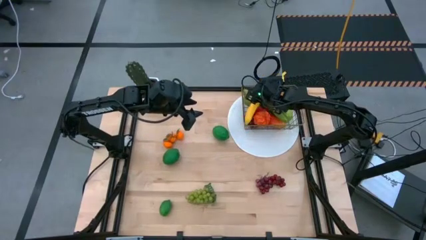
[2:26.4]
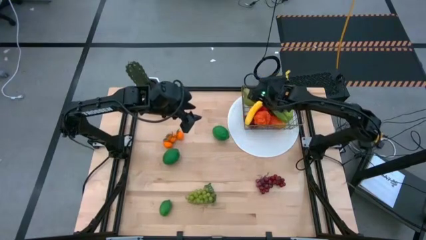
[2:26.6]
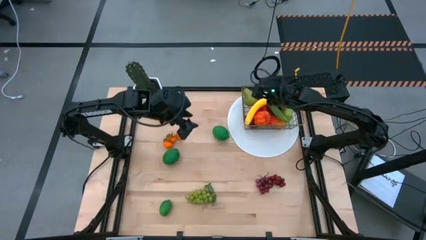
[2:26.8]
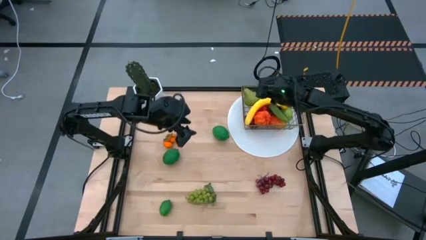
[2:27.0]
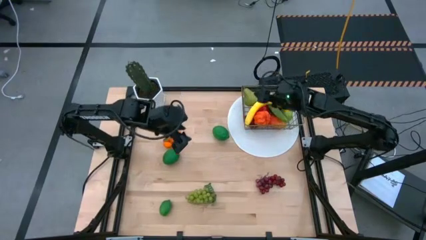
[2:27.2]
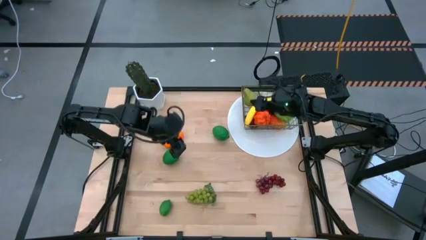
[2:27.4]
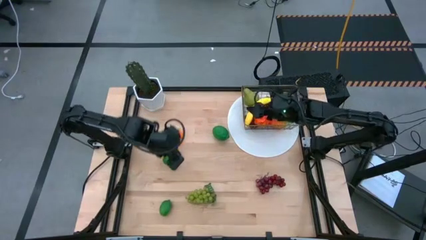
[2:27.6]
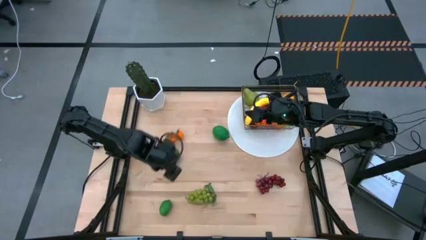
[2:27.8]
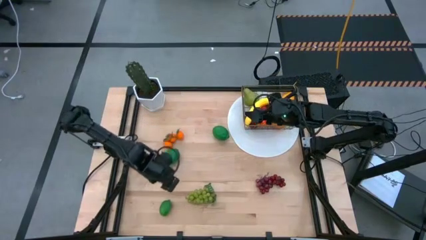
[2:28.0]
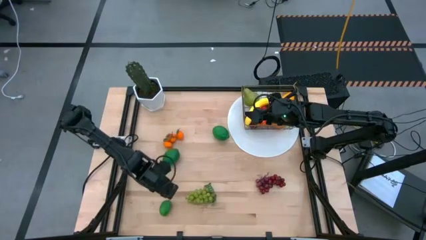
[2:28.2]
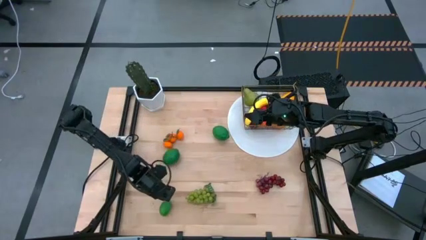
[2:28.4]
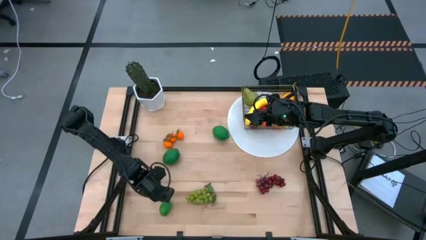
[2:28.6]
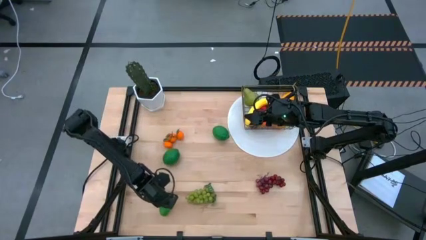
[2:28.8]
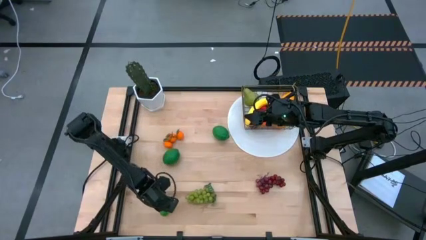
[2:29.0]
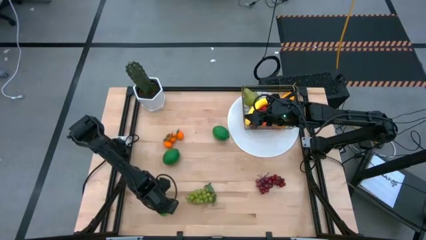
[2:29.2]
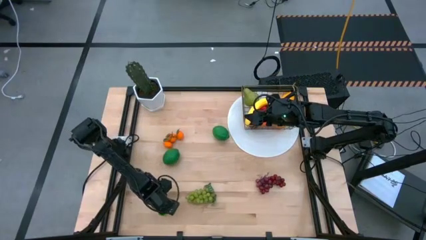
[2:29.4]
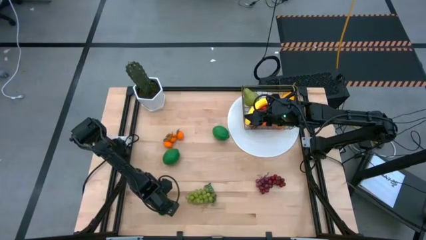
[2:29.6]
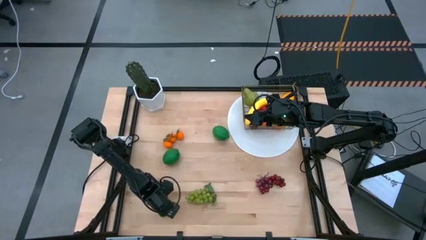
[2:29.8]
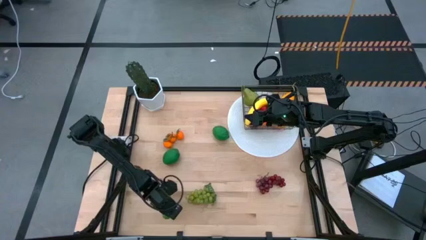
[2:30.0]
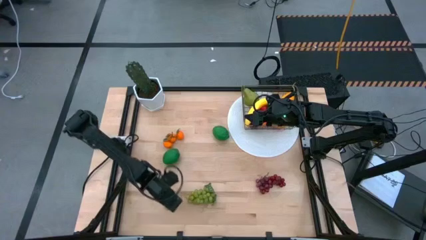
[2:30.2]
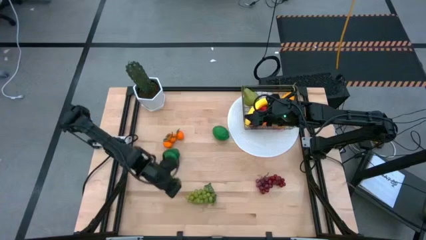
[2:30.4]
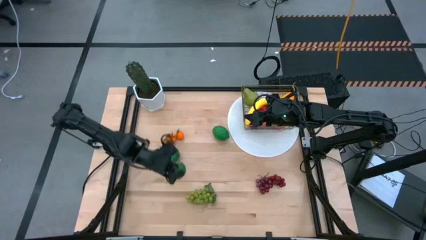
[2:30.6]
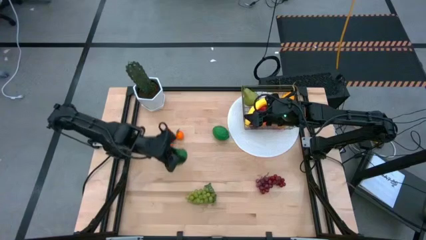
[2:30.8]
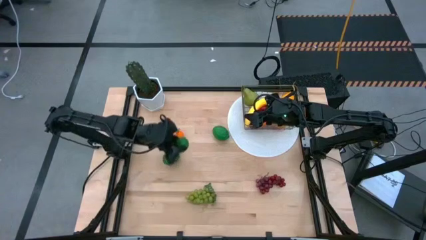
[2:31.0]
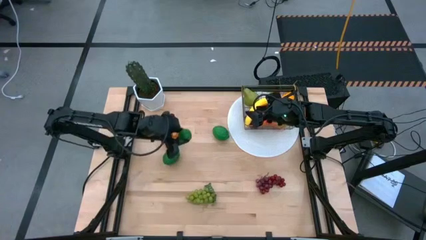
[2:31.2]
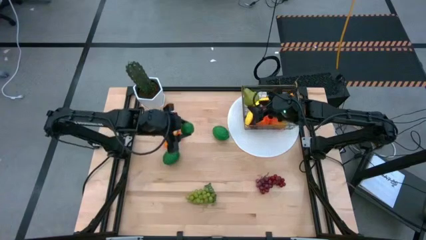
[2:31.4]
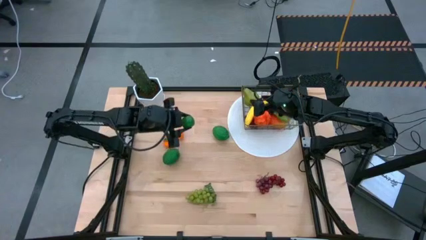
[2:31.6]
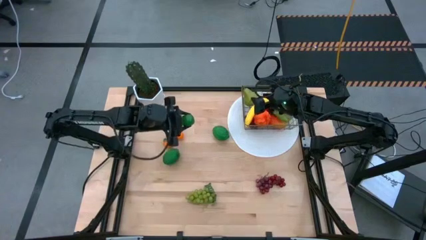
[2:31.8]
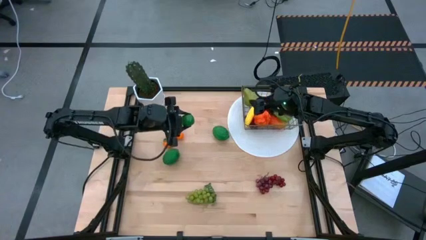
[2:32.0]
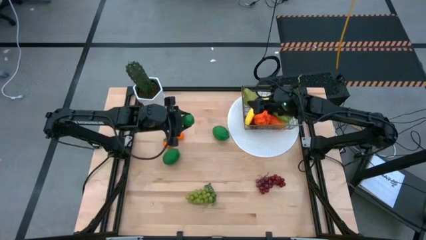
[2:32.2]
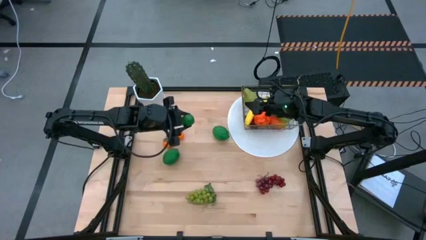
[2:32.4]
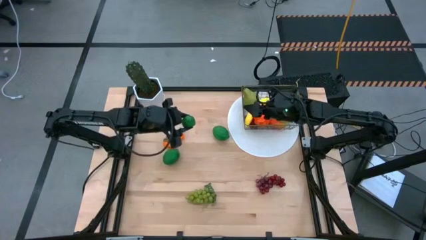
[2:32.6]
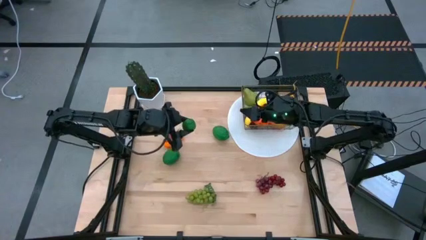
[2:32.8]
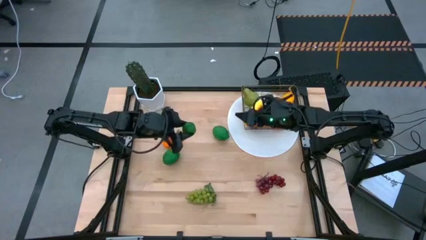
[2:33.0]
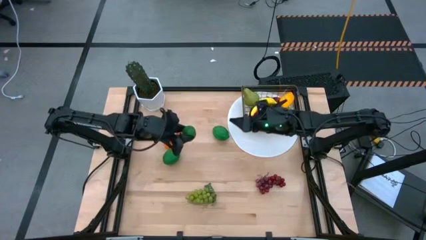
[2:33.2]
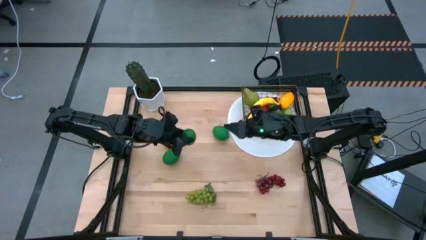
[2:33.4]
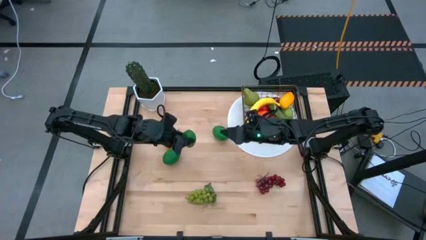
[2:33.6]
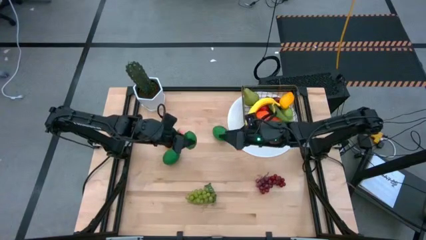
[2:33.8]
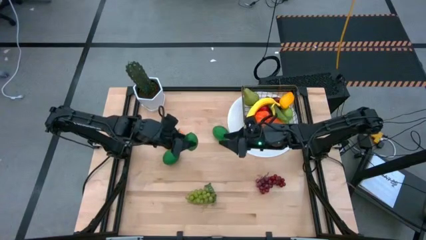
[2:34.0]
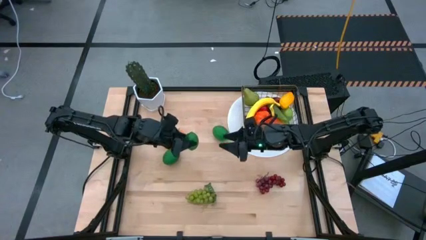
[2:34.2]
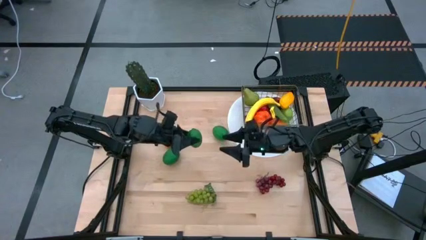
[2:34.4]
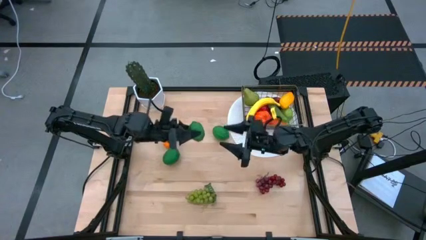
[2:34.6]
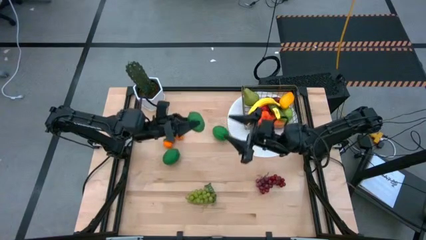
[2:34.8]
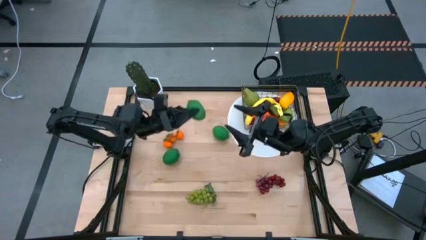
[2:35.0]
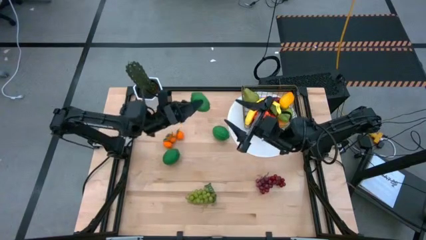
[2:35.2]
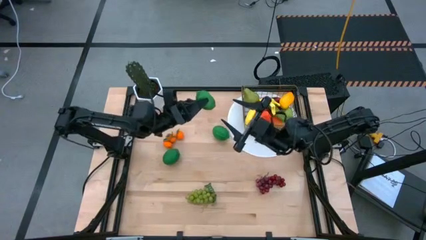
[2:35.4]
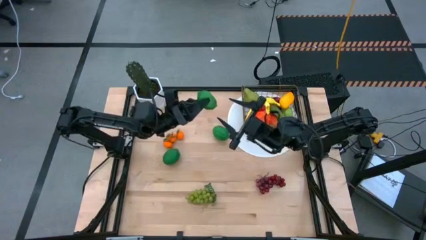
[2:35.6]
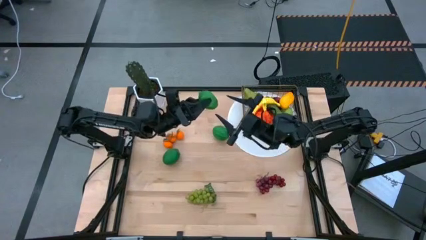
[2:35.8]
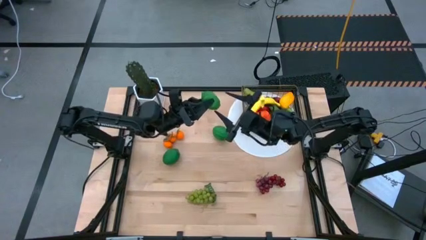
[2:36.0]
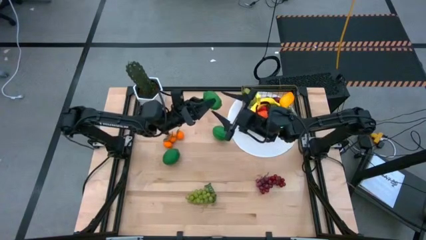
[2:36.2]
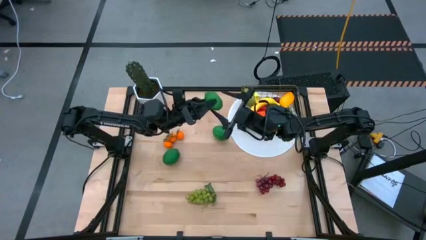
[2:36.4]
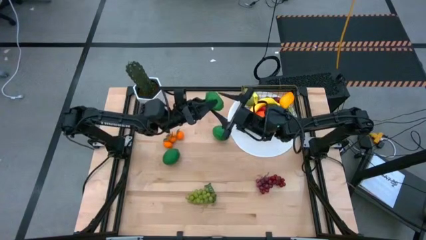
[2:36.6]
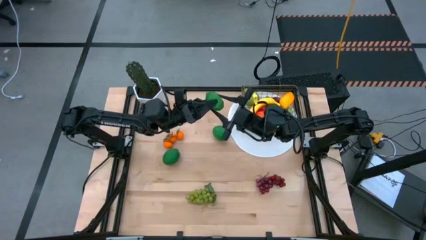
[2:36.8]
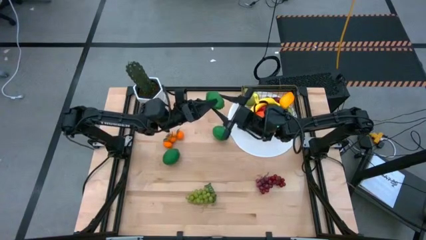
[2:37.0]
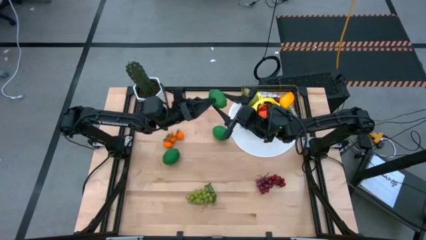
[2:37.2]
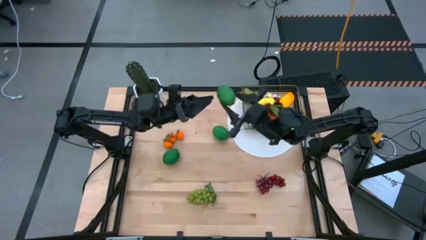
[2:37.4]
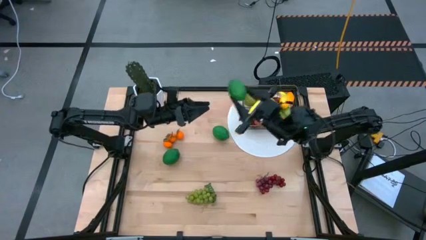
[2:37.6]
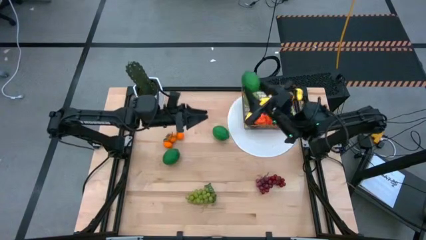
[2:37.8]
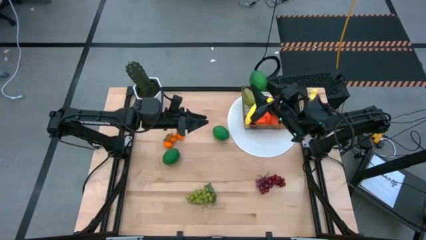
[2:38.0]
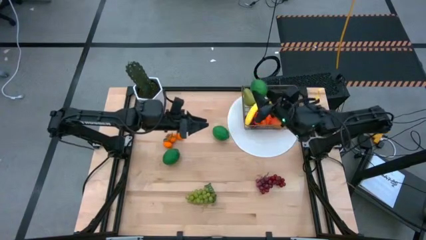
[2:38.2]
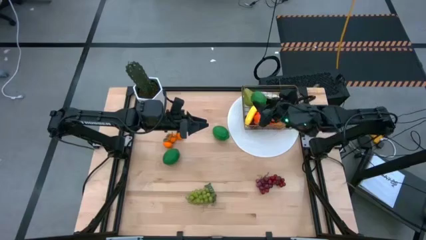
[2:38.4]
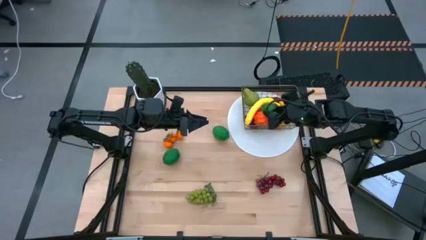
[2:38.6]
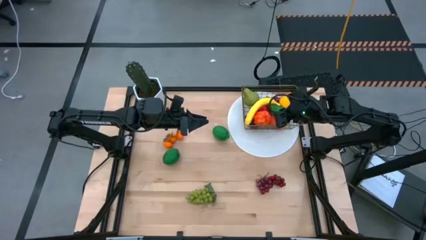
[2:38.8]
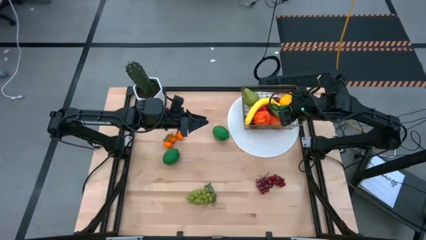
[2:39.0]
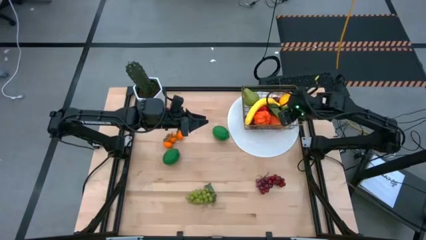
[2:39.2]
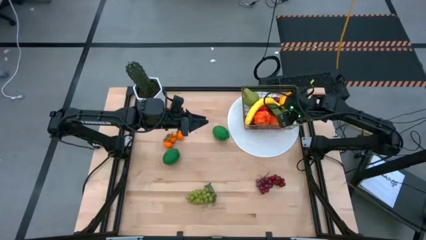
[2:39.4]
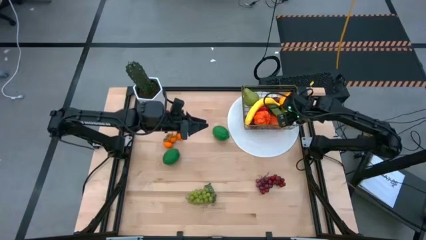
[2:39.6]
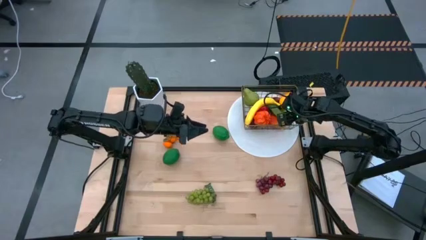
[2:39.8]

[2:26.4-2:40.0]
Task: Build produce basket
Put the bottom left green lime into the gold wire basket
